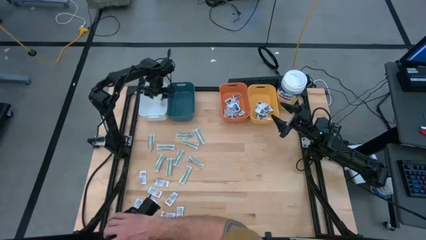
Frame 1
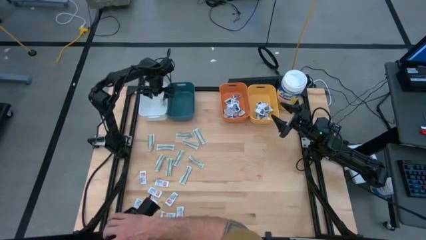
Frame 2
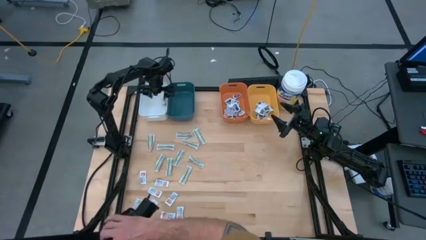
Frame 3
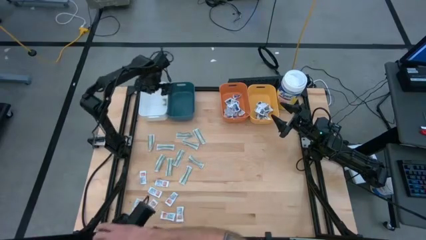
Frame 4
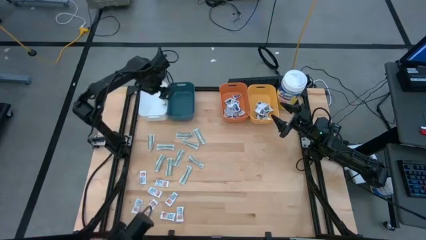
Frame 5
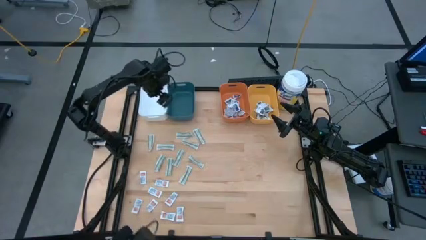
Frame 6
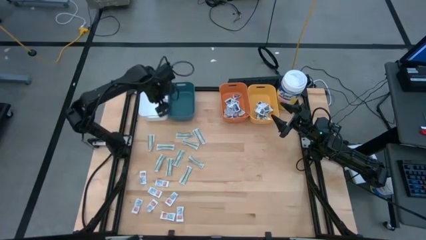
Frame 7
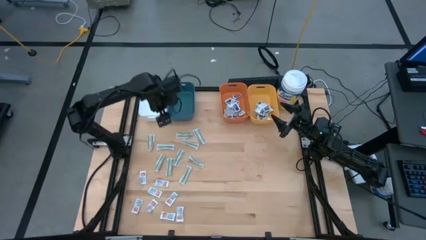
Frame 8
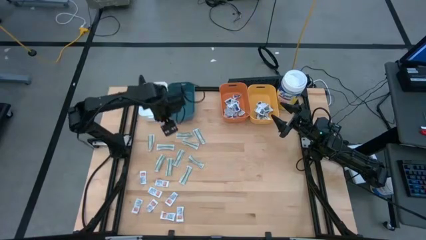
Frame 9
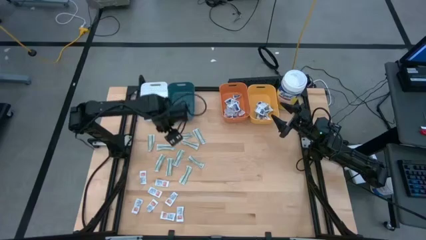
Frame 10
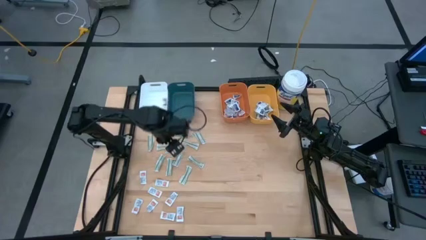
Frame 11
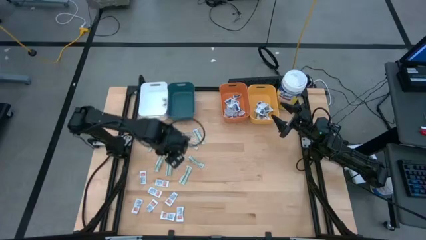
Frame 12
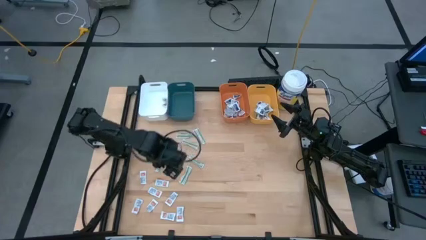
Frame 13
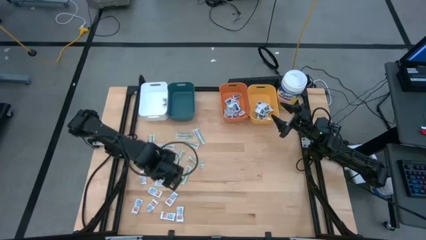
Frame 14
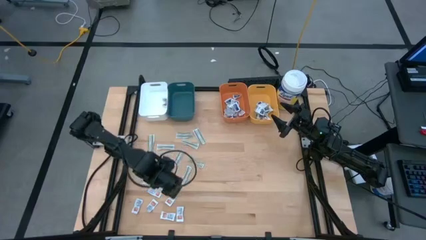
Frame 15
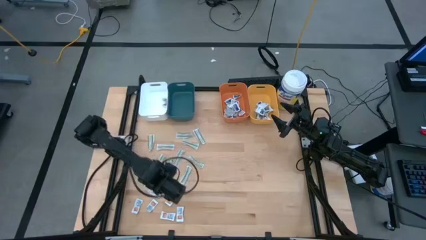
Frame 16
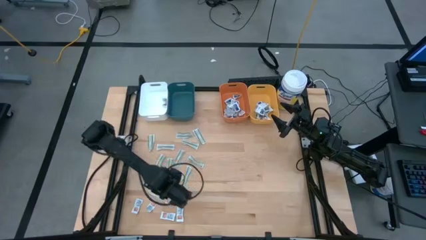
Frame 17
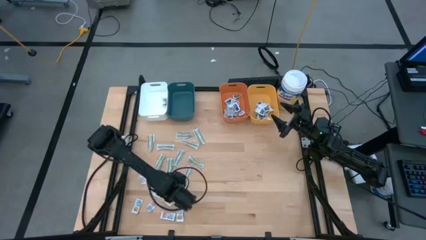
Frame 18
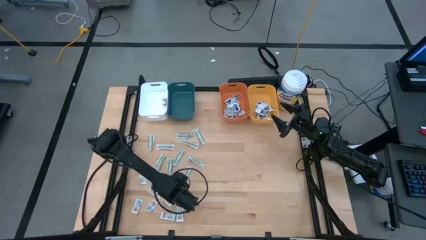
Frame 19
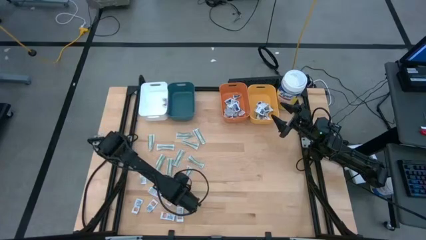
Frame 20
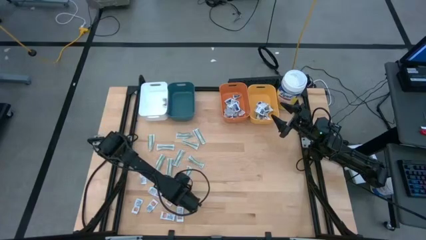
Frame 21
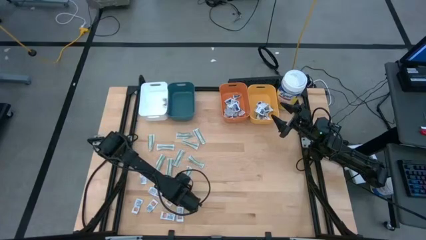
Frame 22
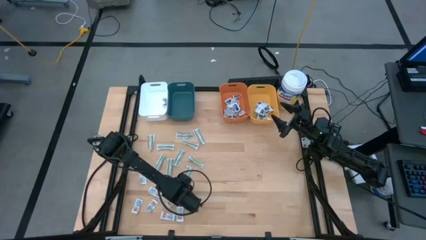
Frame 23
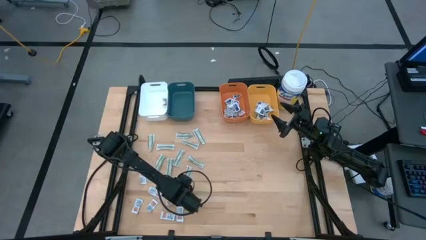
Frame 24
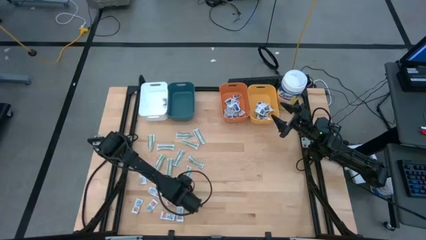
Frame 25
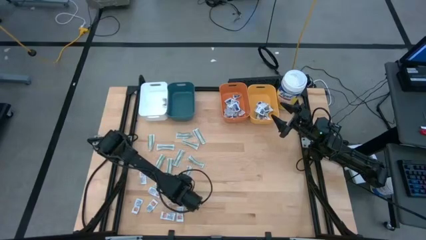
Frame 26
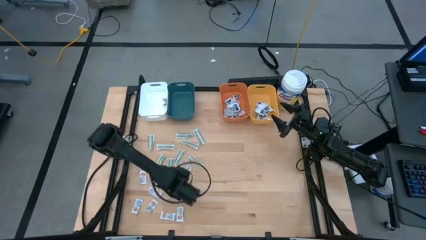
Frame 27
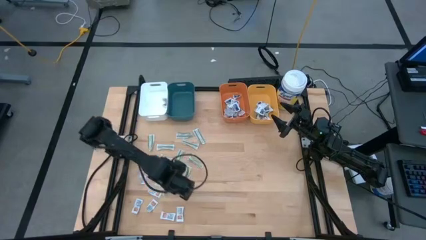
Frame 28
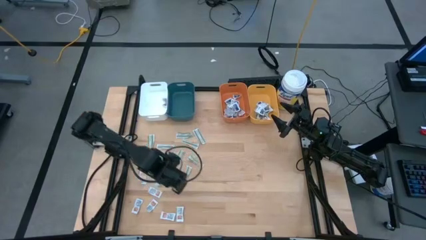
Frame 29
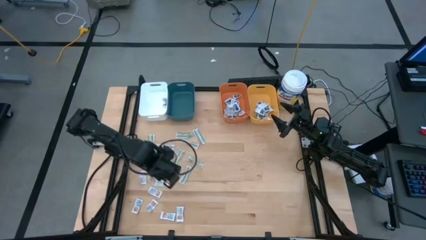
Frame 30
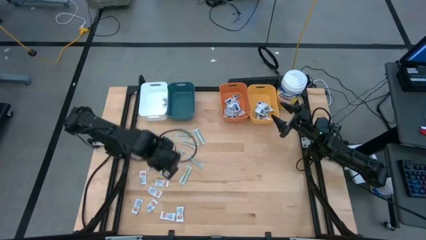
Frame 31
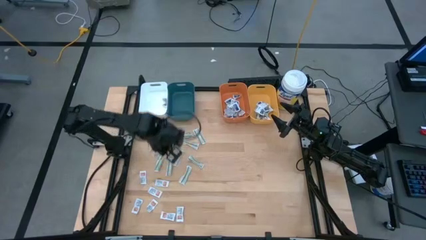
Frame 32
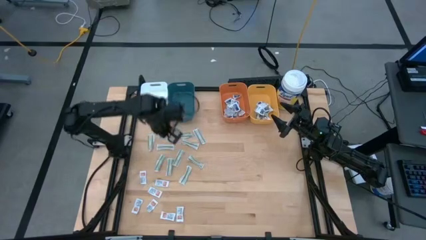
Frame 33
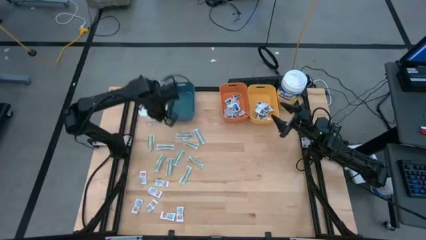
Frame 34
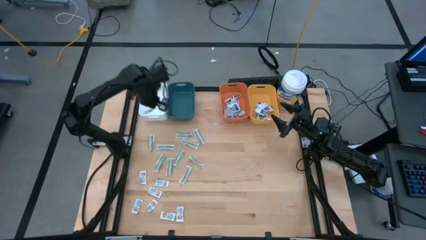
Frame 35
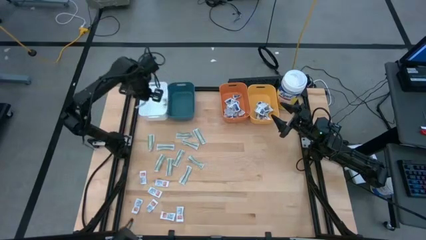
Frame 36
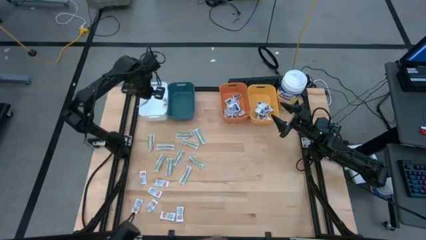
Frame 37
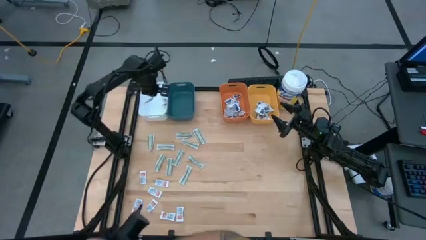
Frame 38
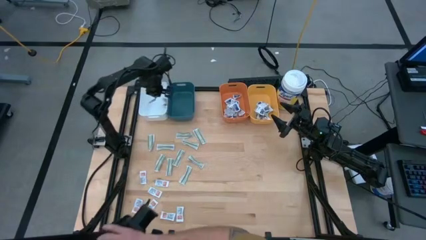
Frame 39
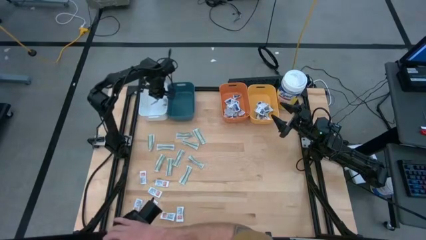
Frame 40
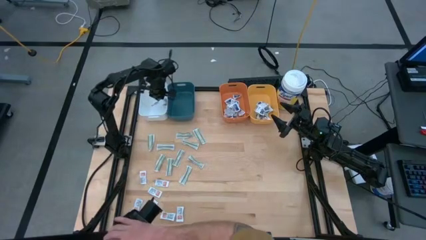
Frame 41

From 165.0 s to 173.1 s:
Task: Pick & Place First Aid Supplies
Put the ointment pack into the white bin

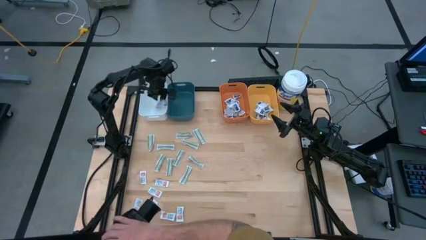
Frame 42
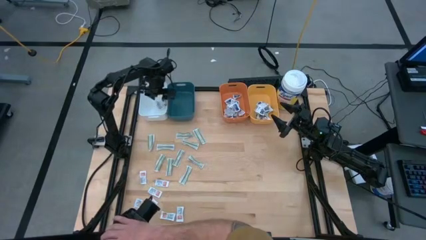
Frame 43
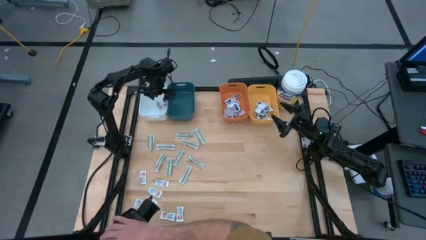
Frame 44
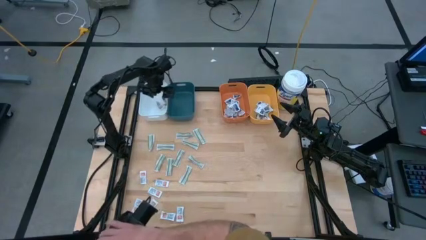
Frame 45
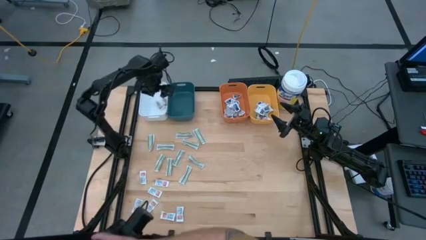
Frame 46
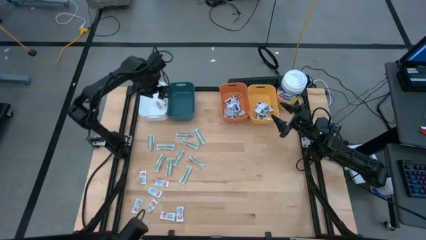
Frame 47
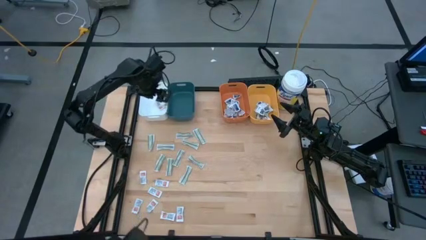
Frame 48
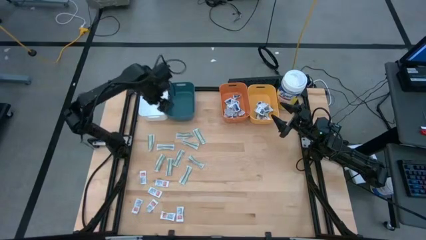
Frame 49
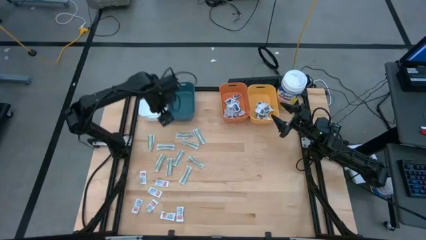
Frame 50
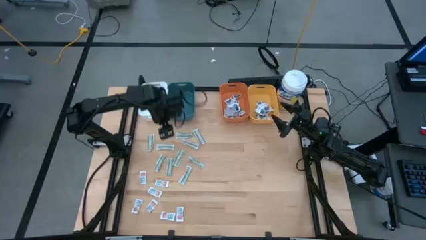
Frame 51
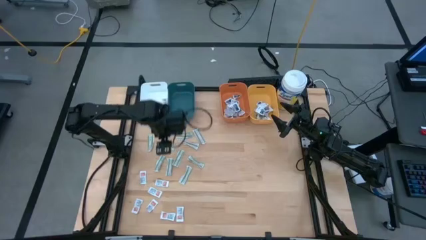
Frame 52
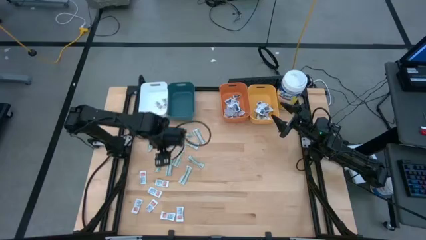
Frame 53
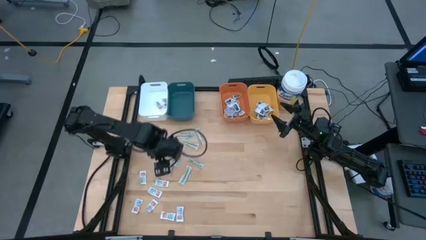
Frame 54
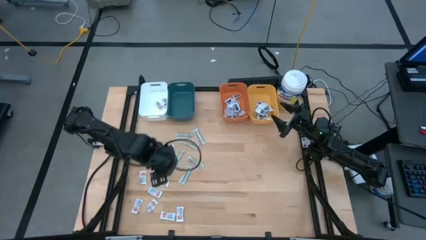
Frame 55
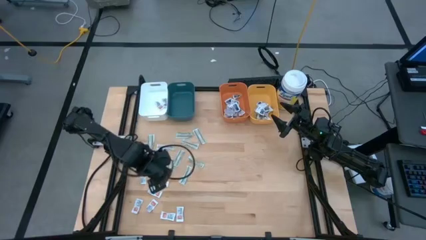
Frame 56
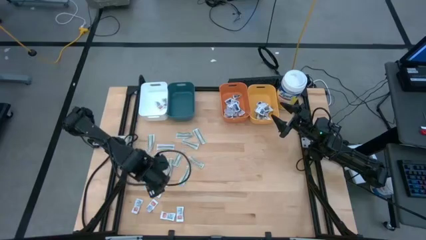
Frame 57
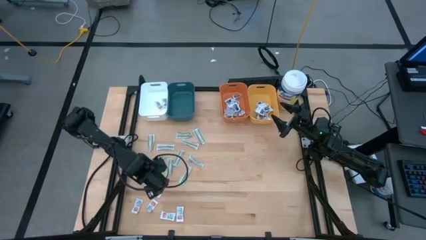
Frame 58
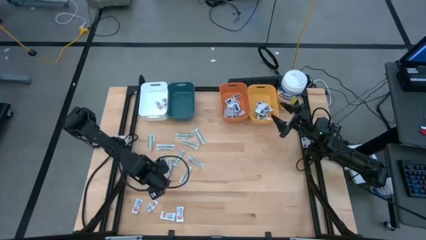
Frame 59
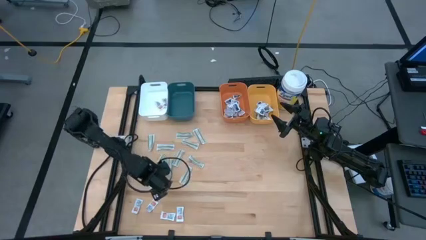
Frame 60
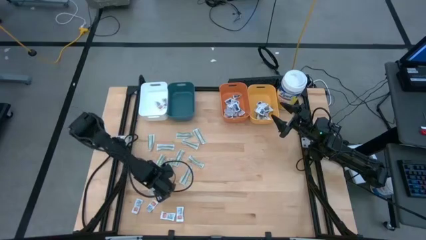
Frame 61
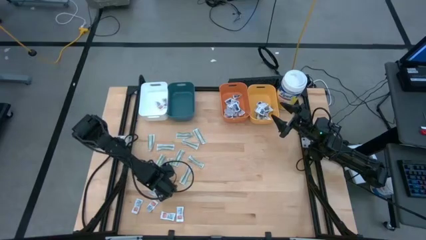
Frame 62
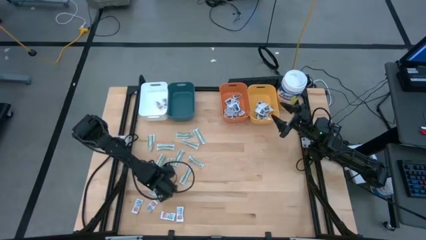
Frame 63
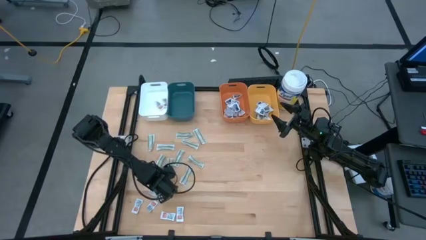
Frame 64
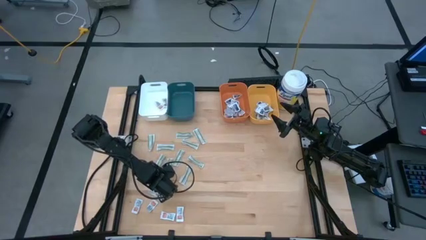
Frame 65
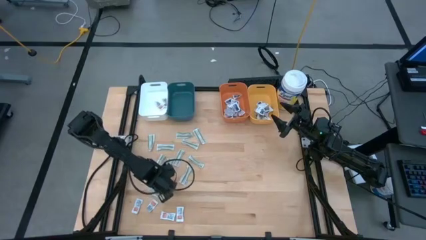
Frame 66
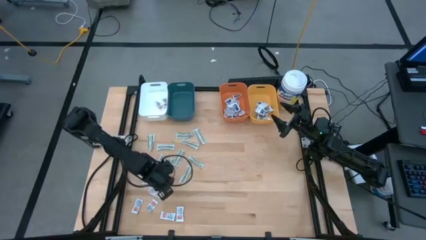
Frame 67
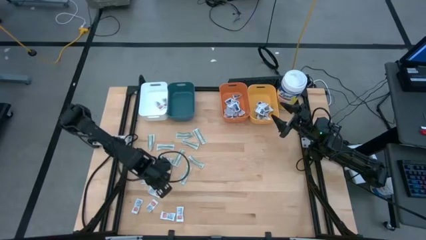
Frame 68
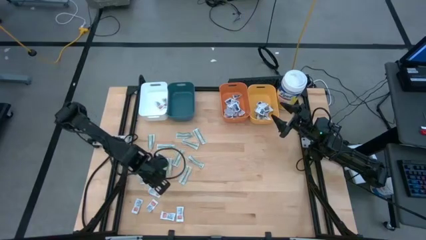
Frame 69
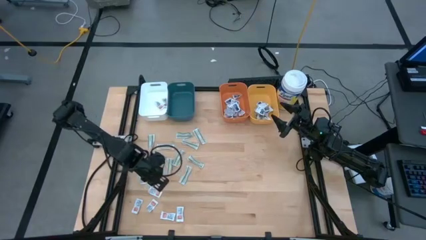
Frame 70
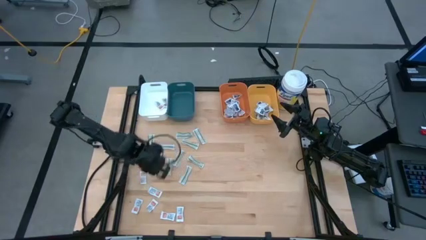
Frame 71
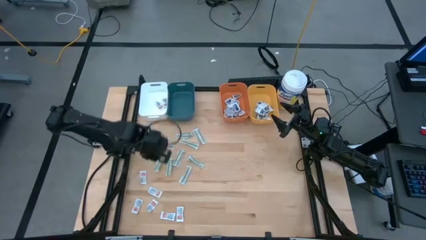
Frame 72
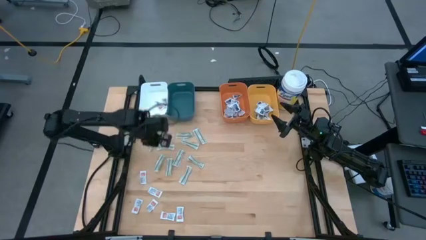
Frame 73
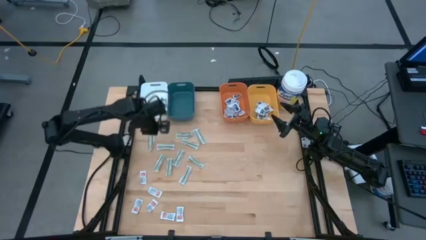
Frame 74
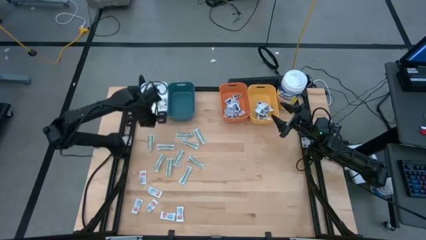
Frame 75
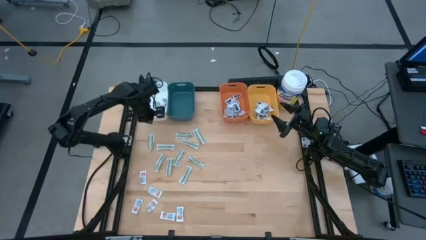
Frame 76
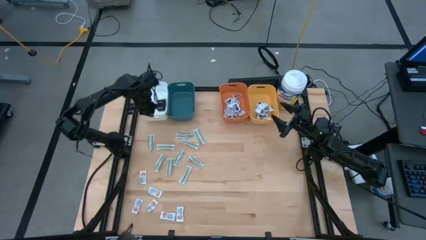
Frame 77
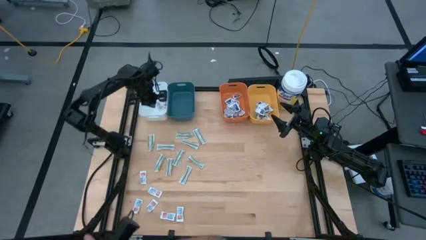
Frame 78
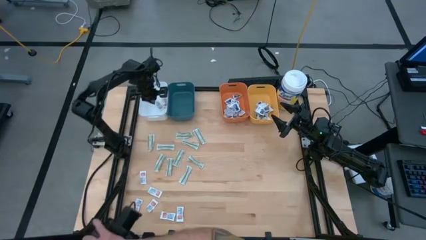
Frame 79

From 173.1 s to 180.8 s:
Put the ointment pack into the white bin
